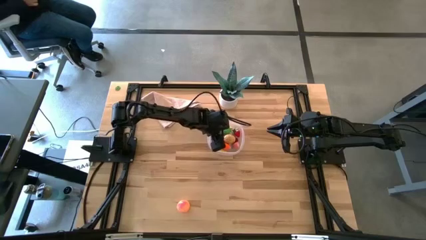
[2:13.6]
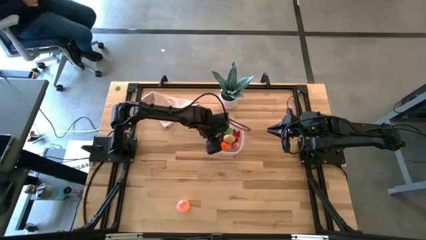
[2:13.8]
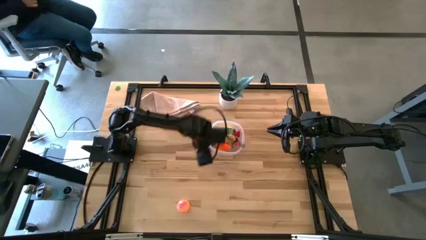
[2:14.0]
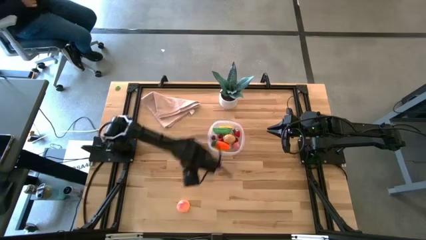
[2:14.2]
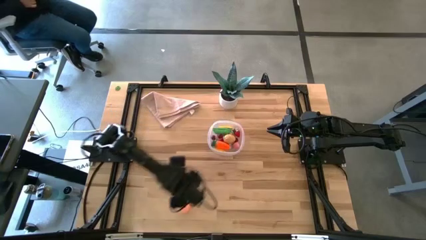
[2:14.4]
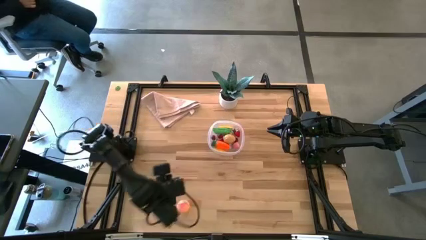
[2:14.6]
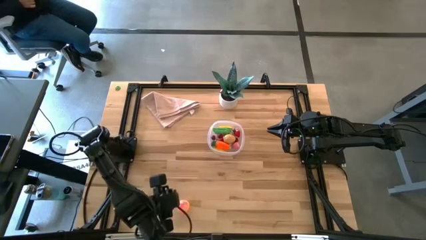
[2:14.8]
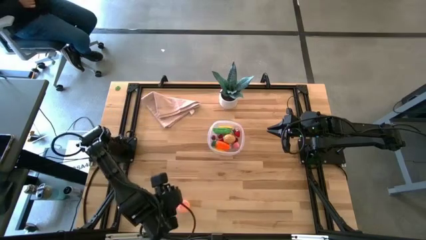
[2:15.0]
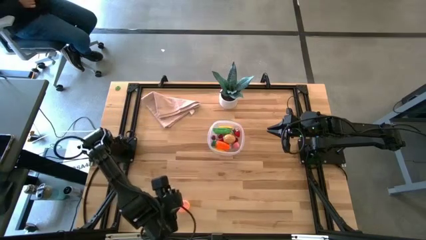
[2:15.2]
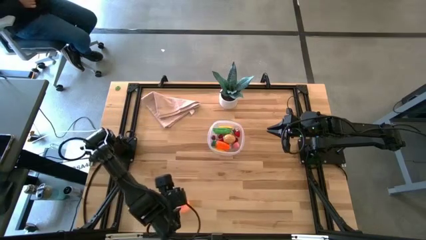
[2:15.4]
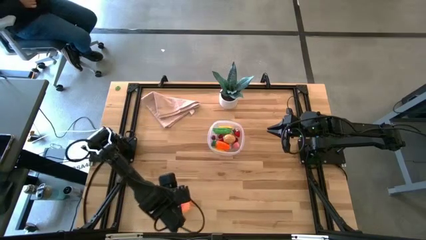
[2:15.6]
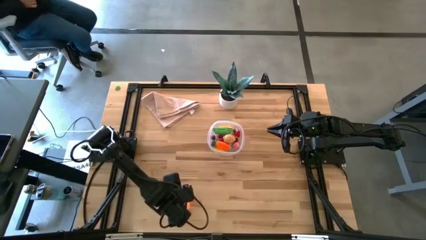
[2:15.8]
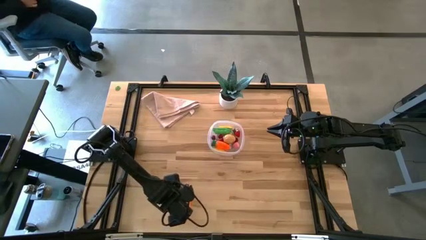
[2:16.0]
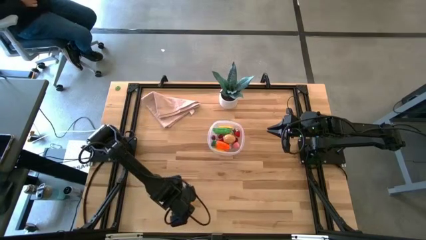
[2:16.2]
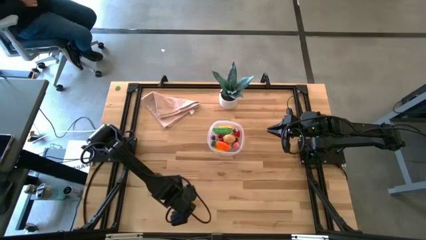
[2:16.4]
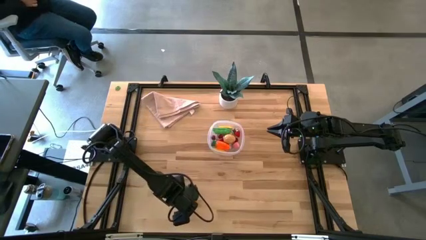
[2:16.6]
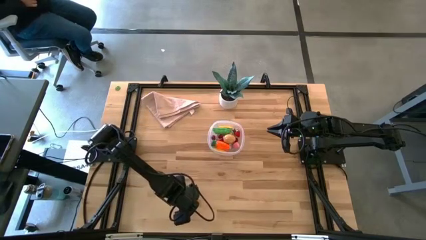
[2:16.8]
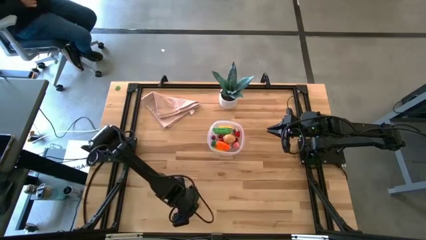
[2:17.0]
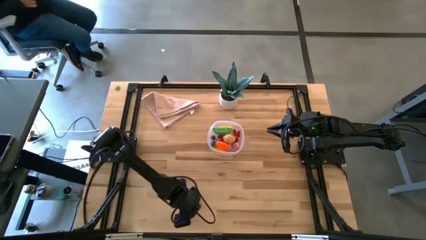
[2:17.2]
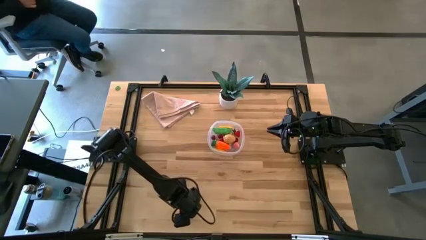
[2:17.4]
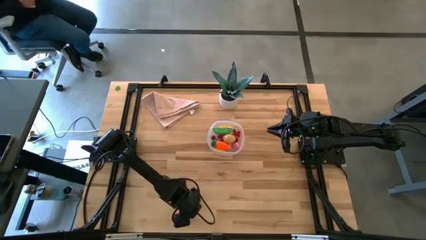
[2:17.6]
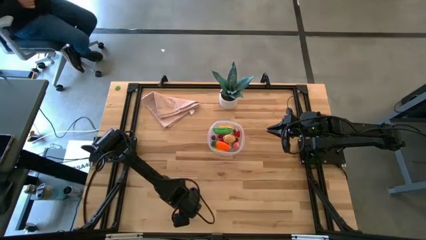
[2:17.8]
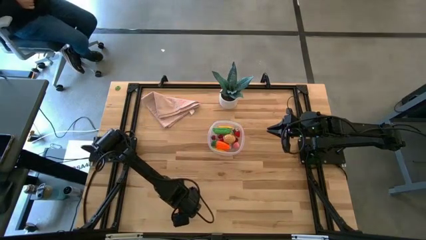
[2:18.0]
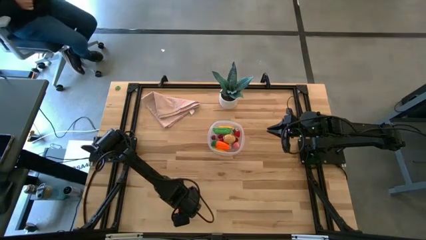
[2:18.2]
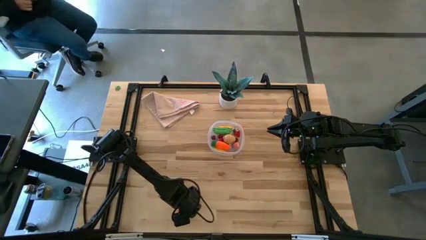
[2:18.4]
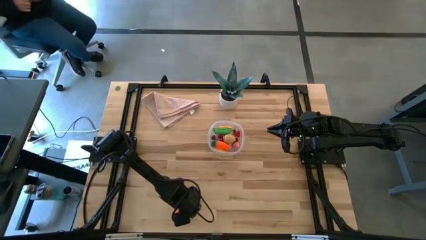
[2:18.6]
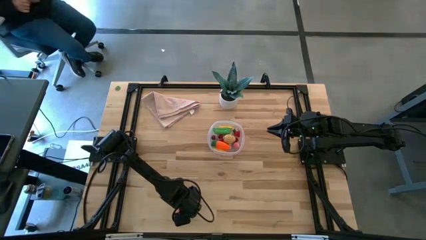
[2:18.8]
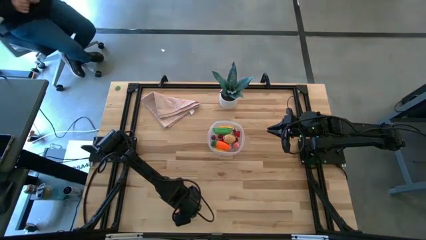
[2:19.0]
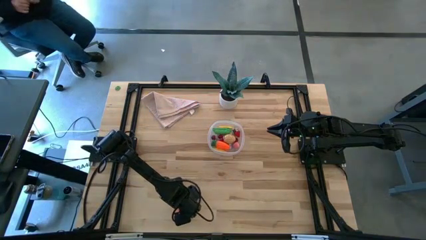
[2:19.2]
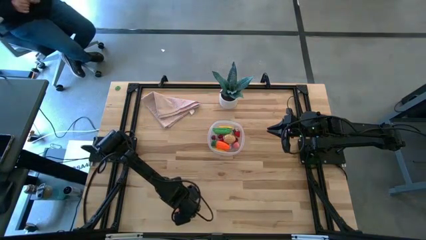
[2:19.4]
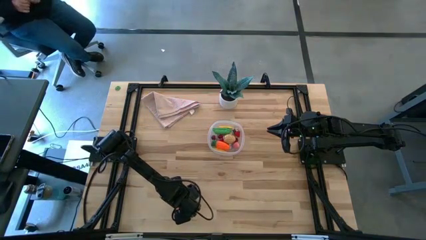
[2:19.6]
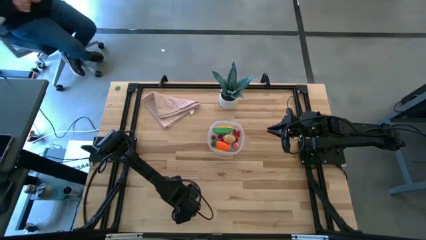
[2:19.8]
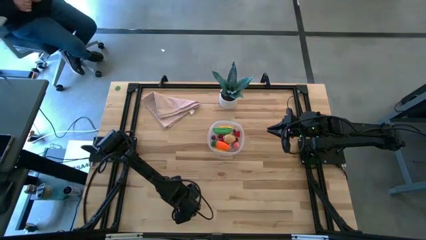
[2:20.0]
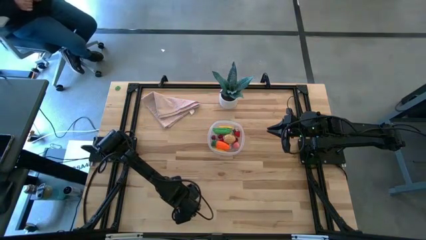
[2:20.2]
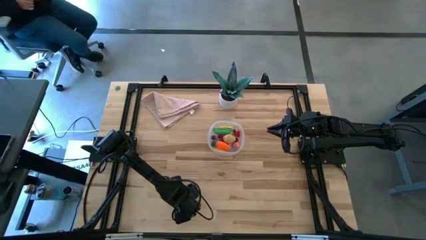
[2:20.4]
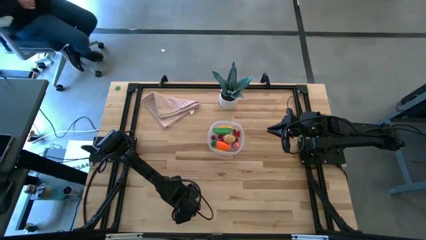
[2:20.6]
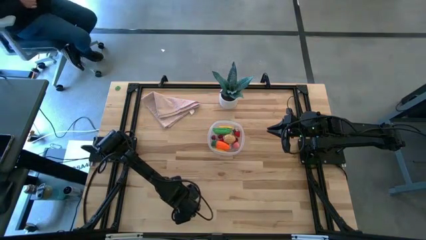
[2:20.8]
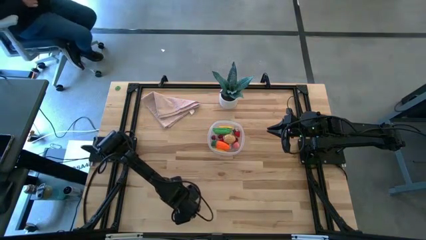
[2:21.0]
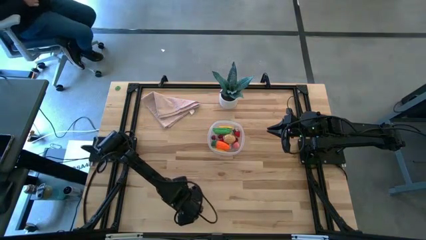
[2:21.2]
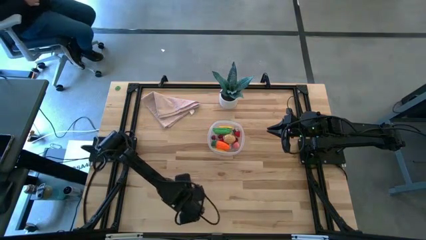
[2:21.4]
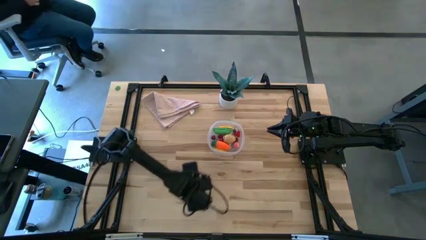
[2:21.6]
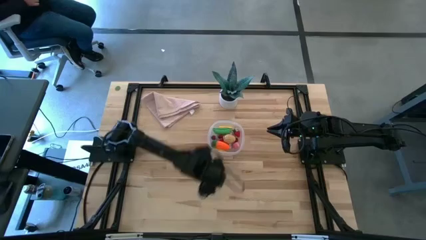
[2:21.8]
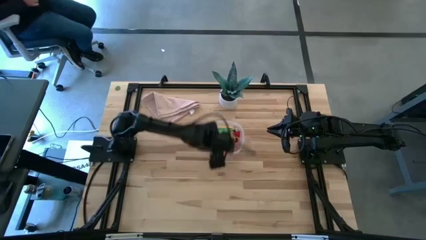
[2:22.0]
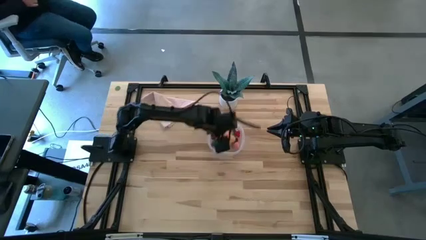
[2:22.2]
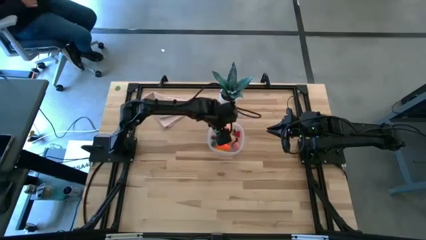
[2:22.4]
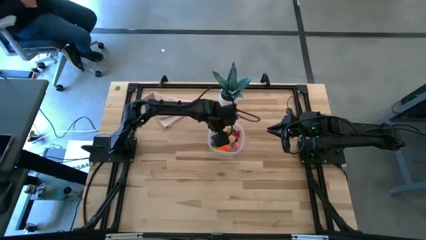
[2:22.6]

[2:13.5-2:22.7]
Task: Pick and placing Produce into tupperware
Put the peach into the transparent bin

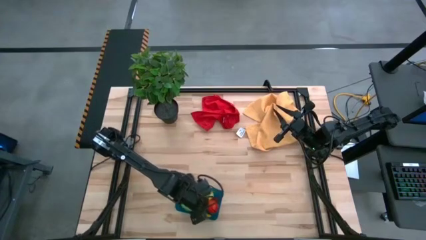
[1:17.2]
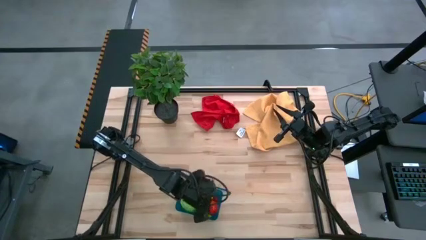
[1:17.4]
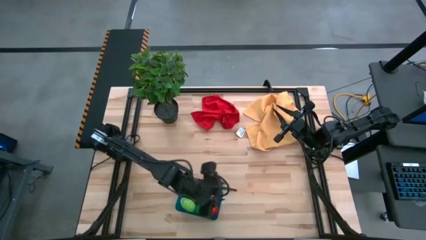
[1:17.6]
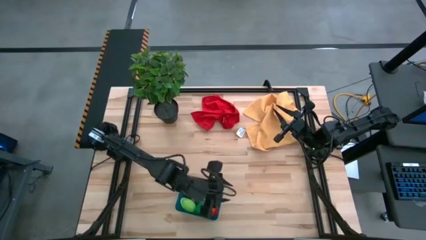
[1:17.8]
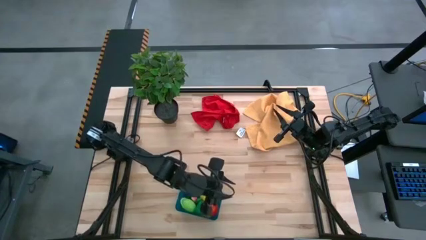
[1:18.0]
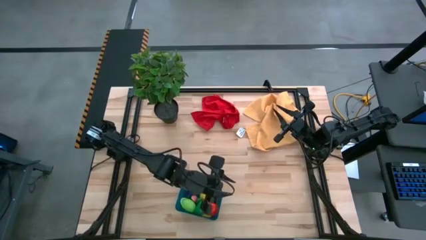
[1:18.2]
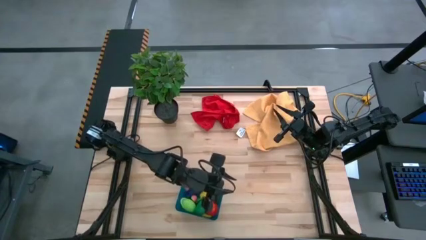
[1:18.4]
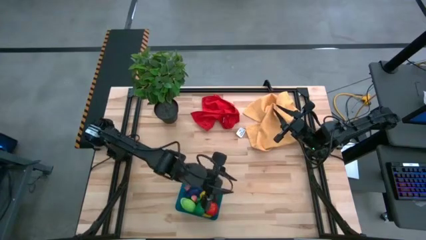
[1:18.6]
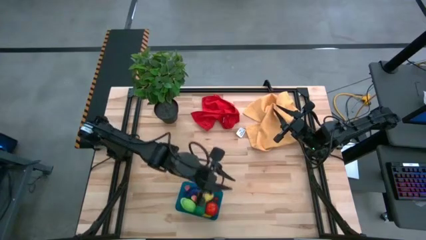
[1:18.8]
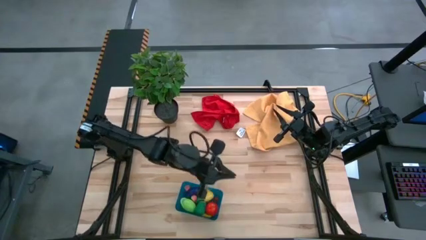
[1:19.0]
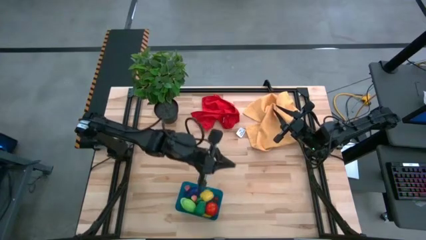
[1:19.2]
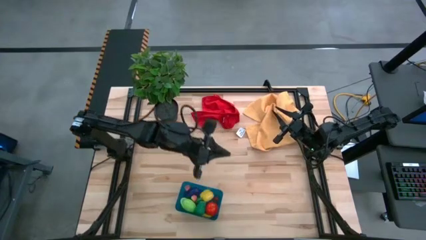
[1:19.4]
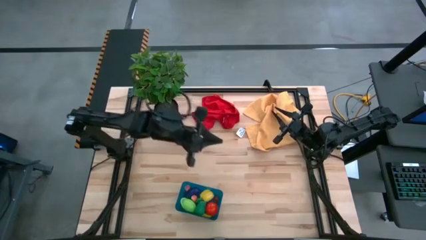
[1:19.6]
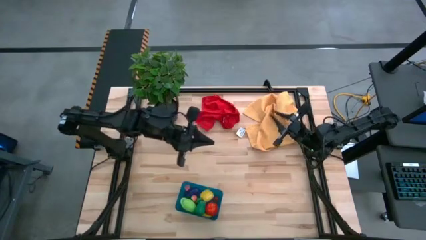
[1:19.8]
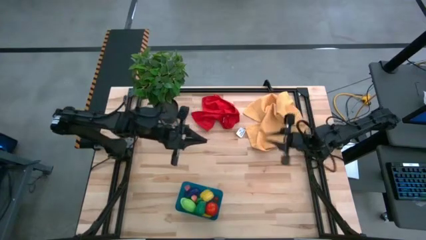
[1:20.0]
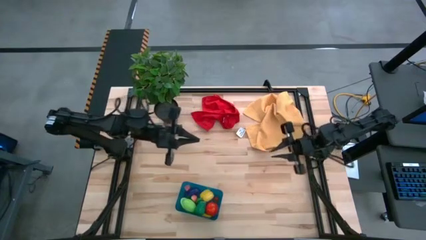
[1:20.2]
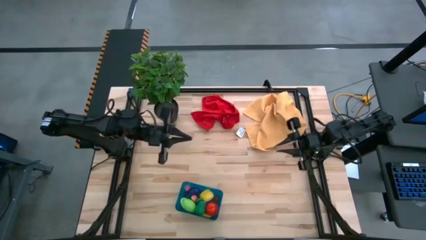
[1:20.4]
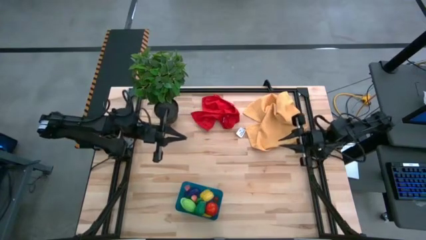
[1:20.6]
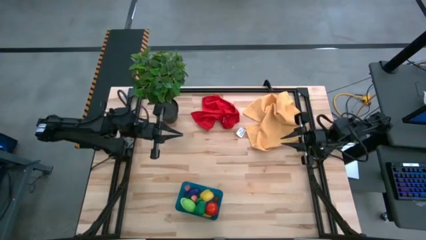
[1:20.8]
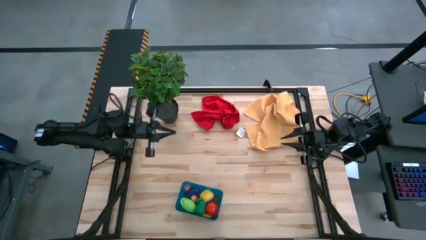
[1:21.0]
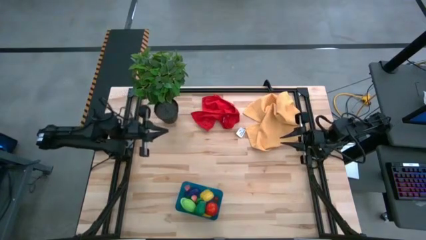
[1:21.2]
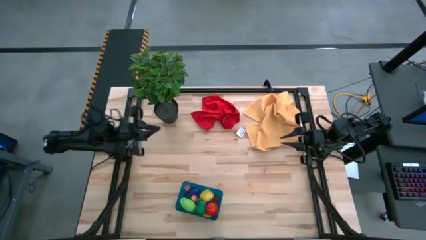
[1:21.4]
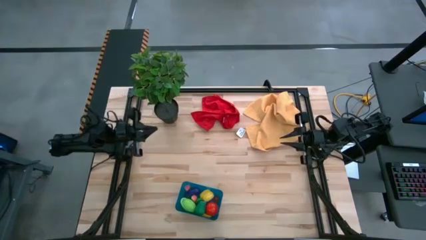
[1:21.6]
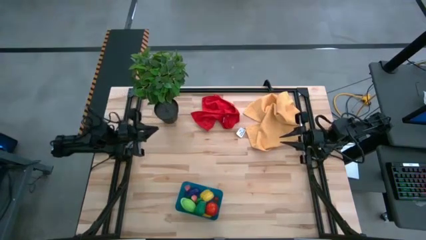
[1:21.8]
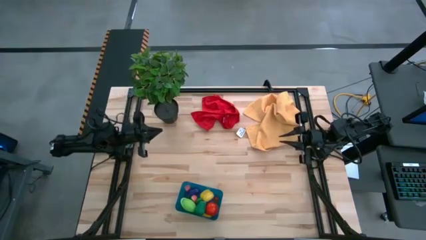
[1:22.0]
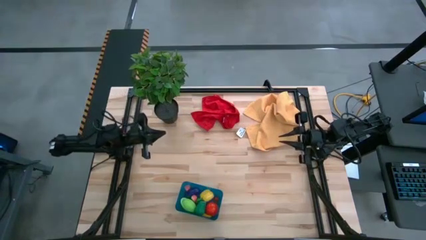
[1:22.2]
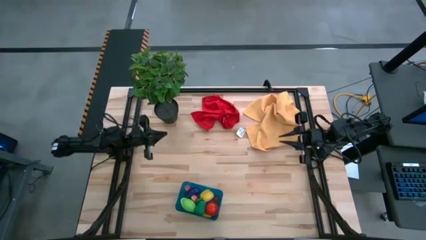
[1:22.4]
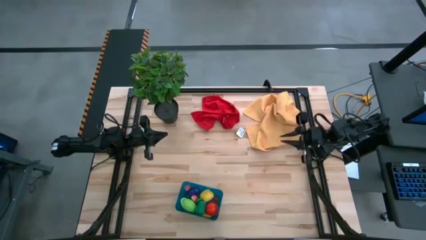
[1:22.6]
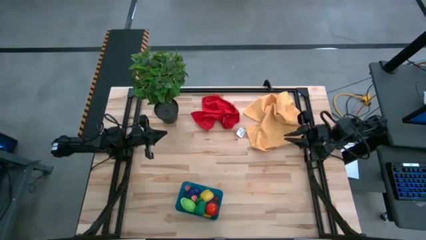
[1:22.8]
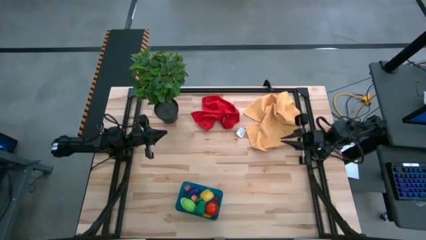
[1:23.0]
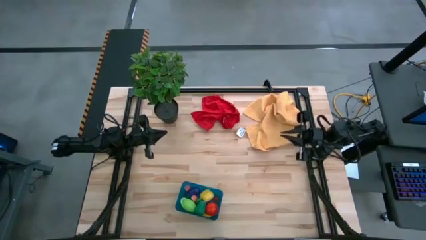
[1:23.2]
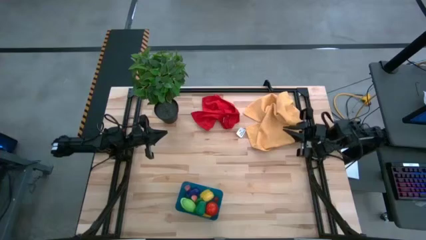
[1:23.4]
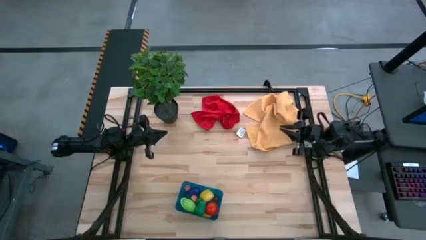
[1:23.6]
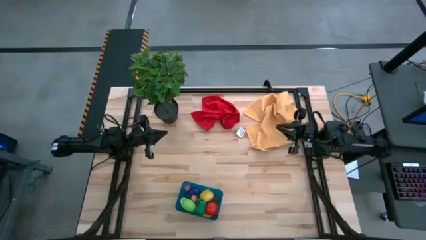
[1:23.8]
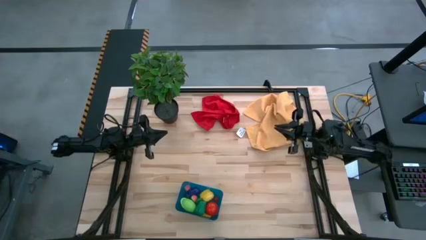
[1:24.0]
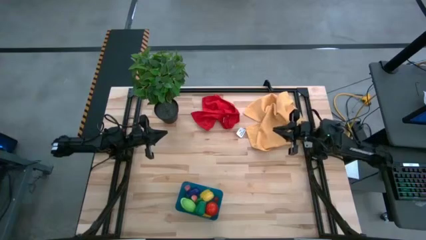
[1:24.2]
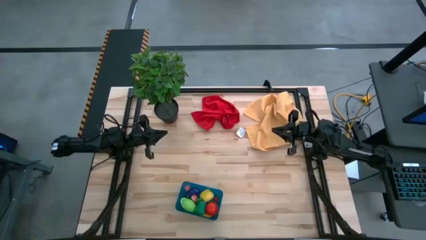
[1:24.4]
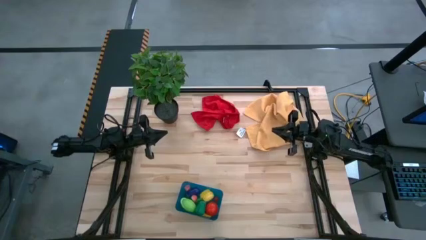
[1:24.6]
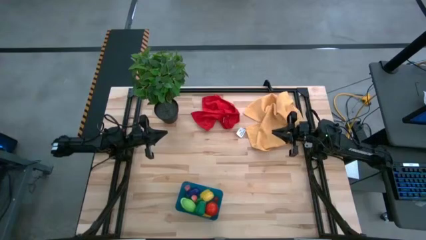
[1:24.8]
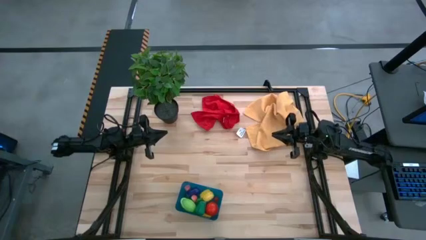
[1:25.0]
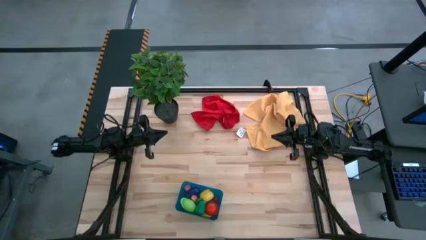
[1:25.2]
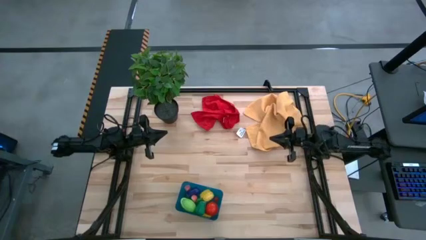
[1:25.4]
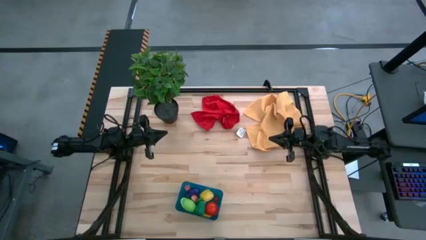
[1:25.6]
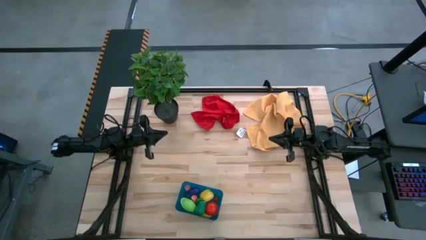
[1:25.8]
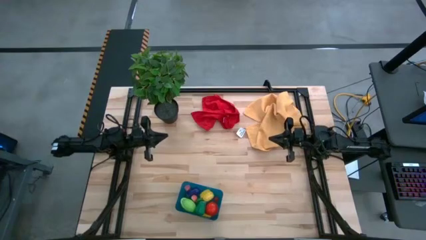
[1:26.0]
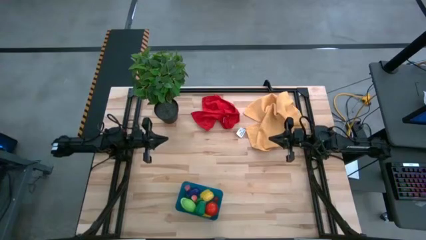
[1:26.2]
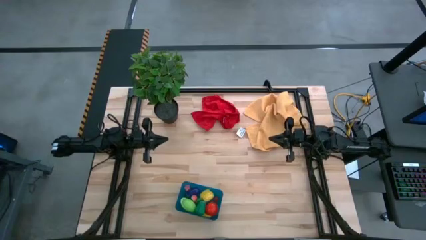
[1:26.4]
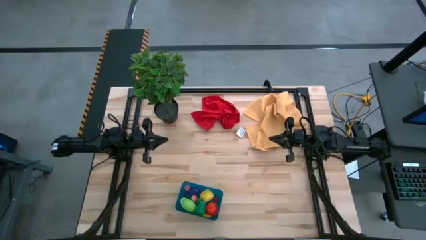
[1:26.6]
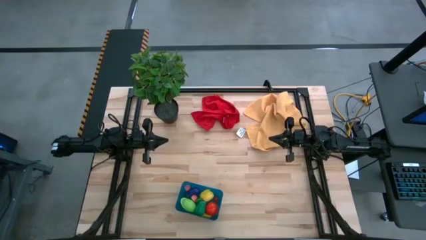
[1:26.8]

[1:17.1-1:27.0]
Task: Pick and placing Produce into tupperware
Return to Home Position
